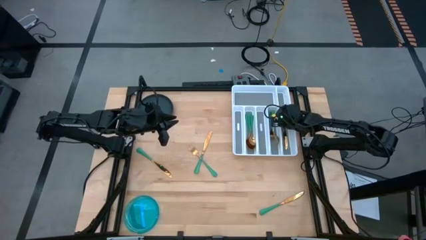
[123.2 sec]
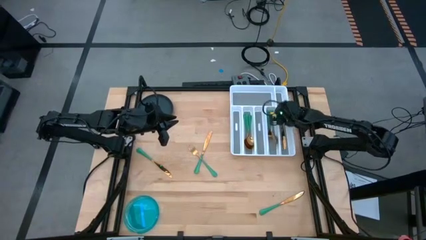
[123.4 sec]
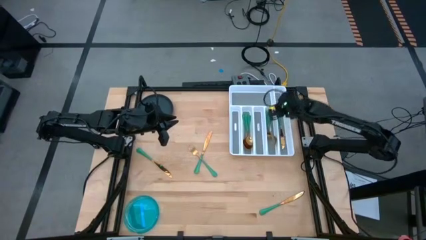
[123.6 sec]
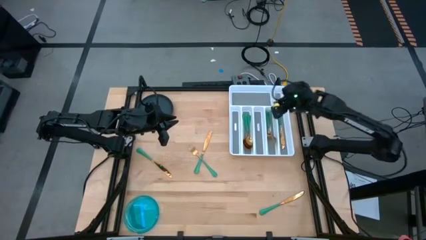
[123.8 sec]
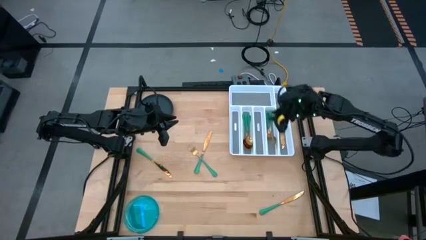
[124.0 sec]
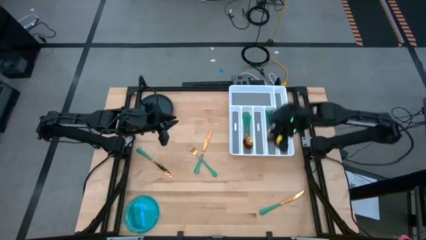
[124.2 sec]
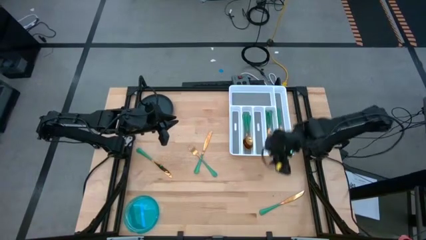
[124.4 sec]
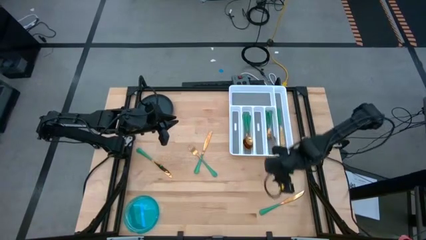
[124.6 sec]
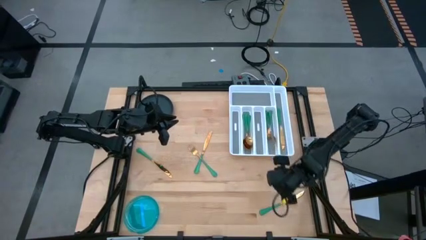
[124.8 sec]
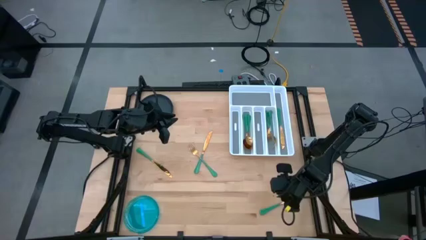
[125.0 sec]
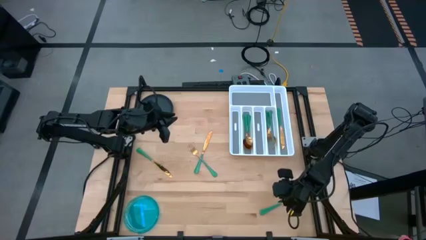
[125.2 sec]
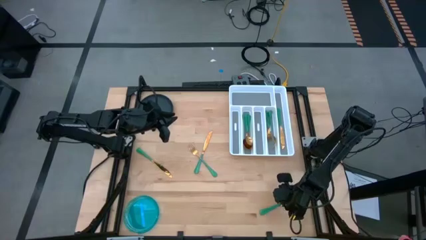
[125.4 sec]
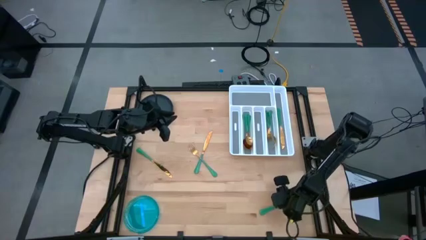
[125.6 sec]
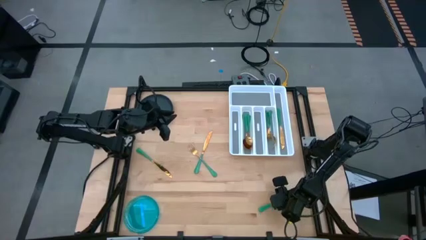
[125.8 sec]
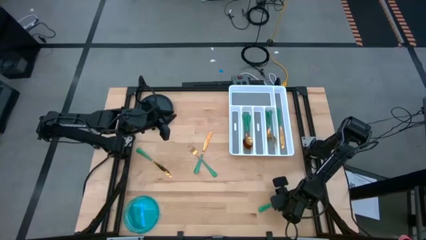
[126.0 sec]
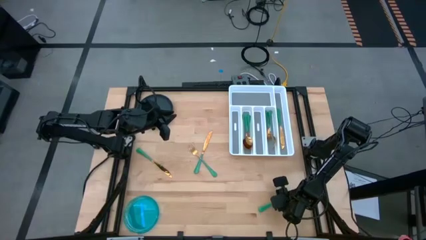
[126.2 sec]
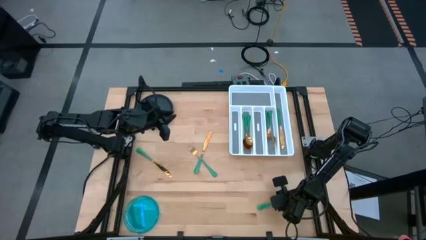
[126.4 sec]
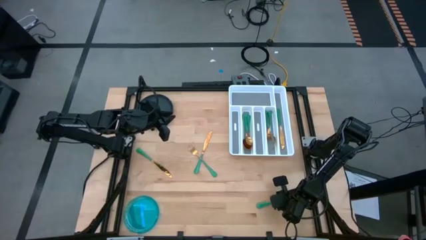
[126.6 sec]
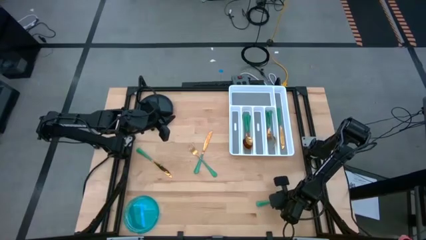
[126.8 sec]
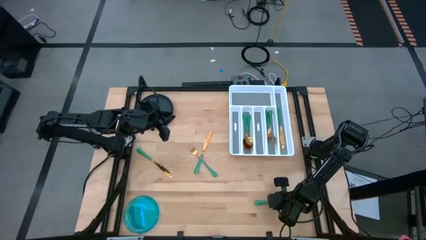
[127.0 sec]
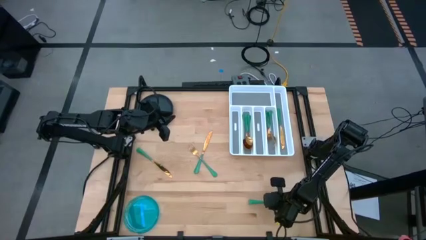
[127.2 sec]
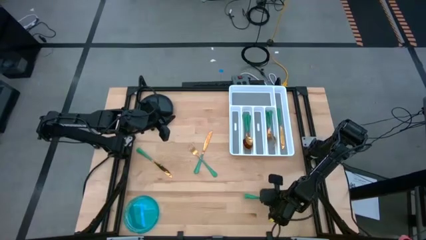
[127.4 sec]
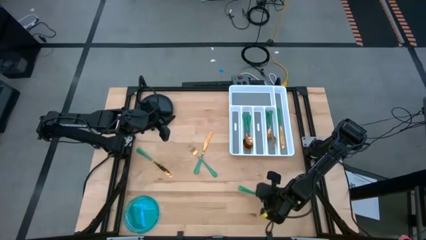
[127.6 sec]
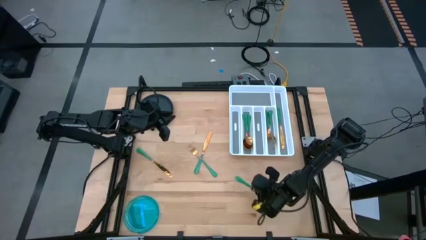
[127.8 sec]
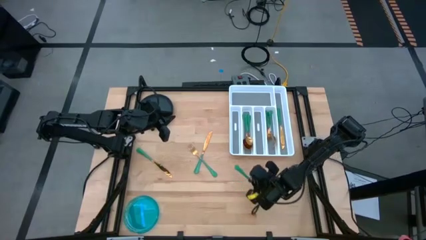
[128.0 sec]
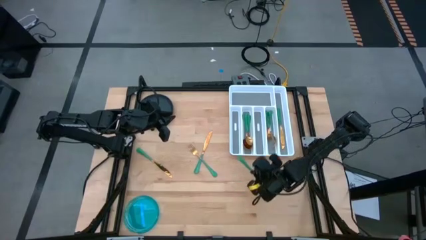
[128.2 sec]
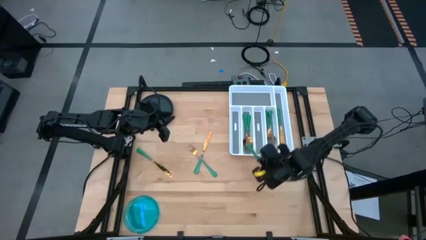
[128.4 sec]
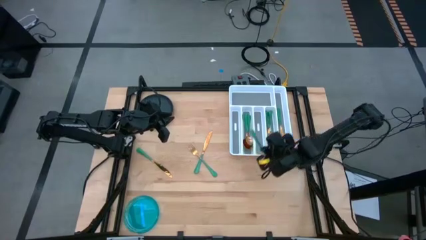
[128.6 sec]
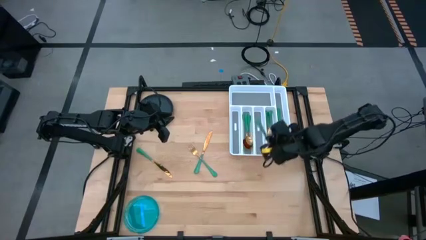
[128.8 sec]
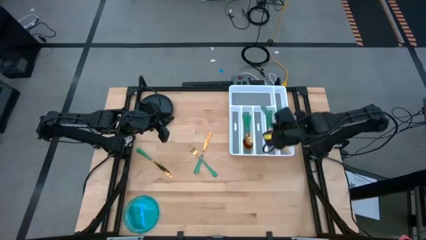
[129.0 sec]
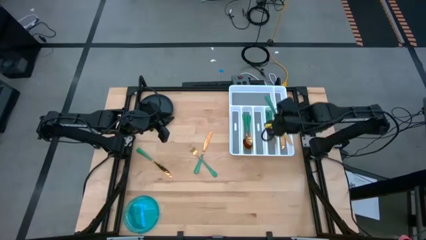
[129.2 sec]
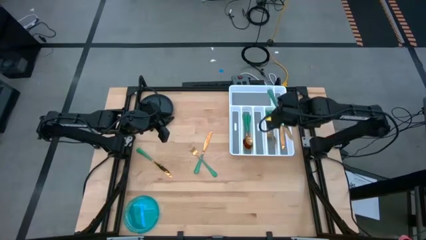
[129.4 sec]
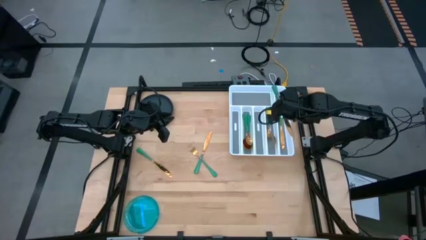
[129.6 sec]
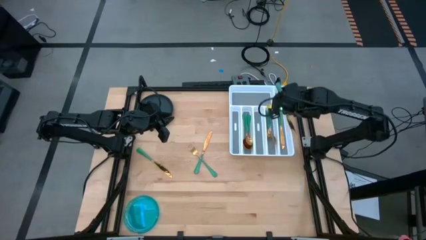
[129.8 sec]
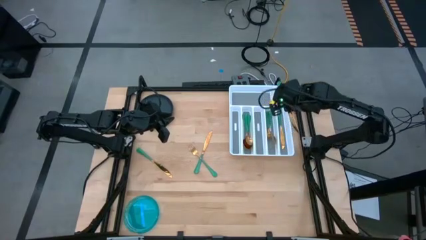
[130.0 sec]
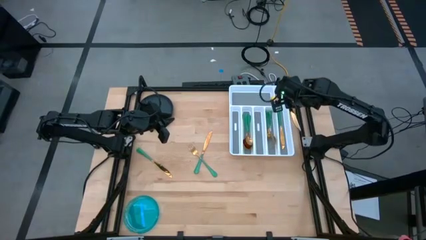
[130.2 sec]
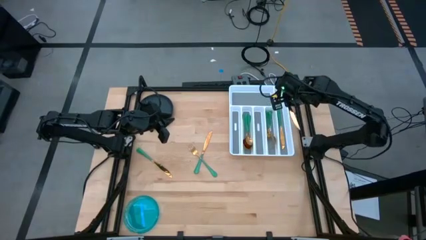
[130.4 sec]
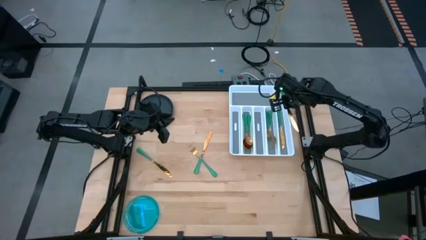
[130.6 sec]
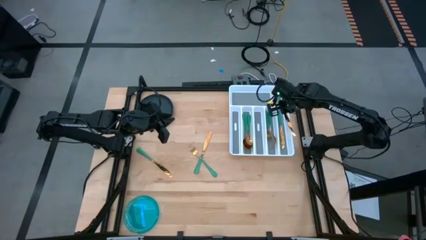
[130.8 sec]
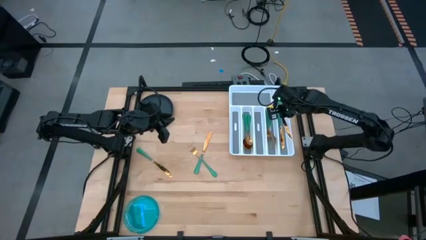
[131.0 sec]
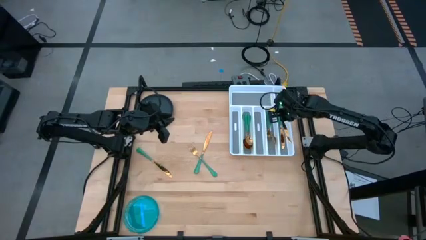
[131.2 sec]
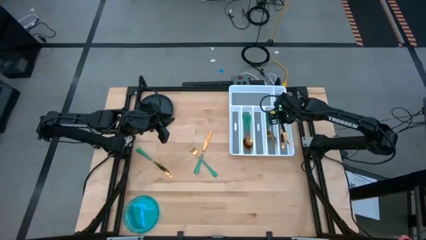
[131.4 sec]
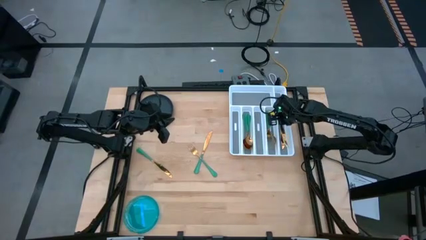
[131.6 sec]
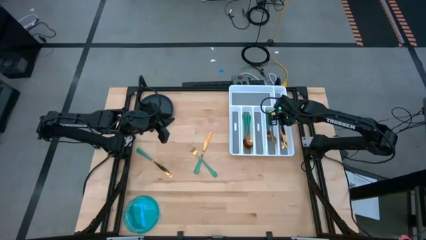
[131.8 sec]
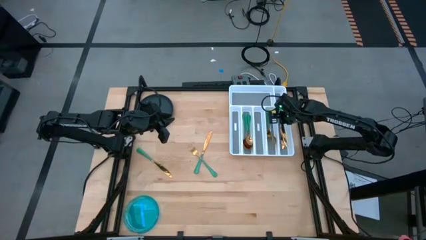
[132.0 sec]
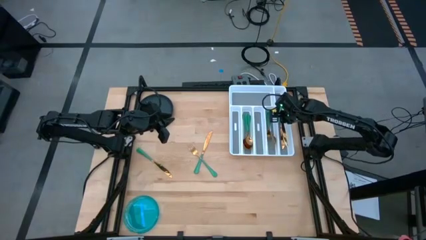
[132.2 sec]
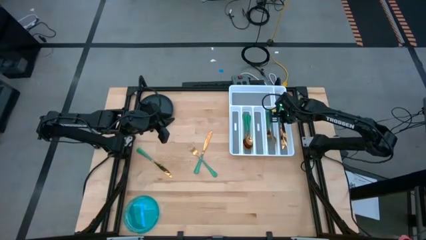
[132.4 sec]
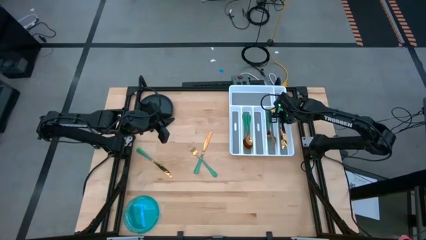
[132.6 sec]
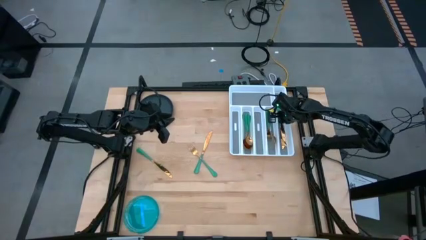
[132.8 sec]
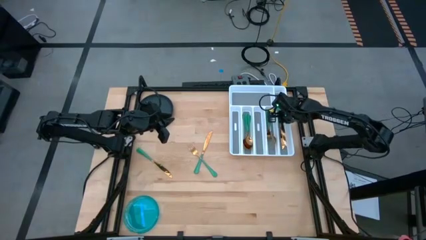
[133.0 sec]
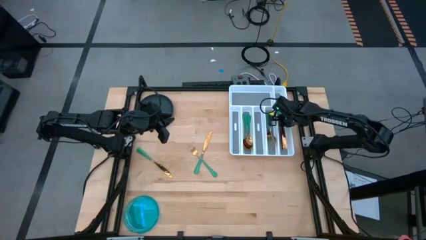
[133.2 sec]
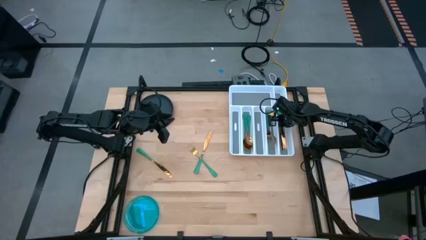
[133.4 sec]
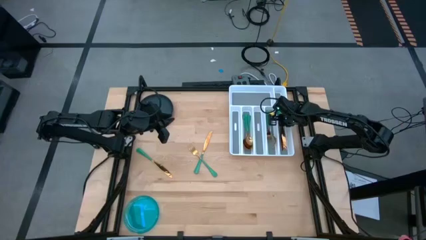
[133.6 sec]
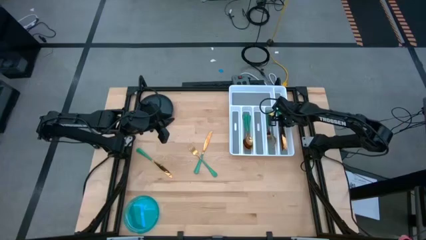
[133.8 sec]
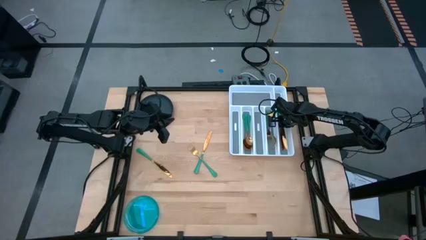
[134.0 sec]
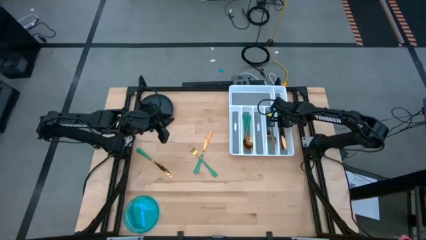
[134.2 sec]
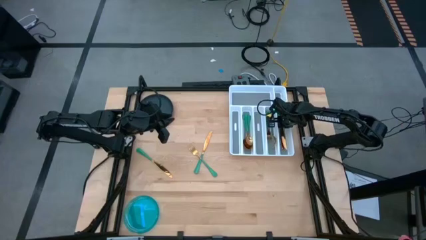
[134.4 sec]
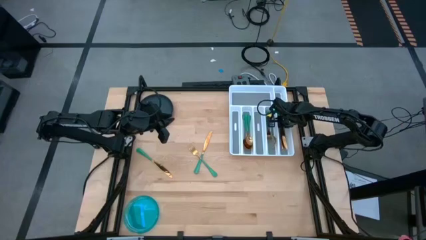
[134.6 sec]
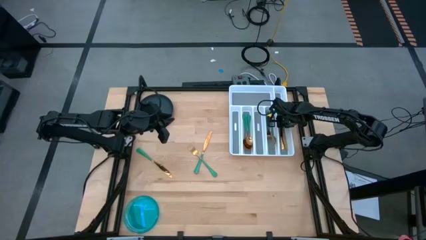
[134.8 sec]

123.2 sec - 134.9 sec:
Task: Sort silverware
Put the bottom right green knife into the silverware tray
